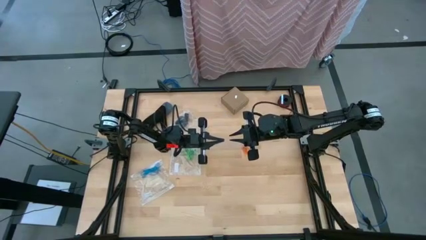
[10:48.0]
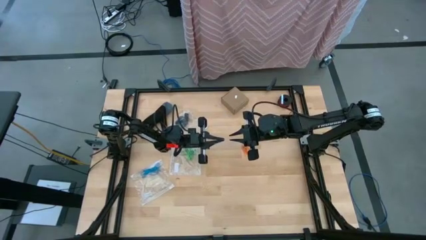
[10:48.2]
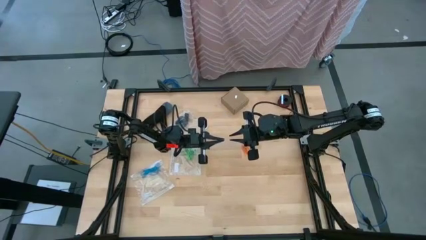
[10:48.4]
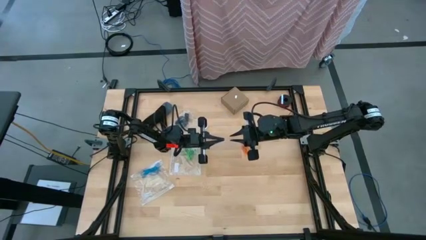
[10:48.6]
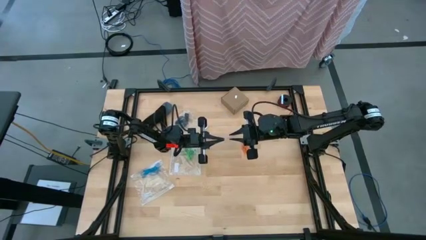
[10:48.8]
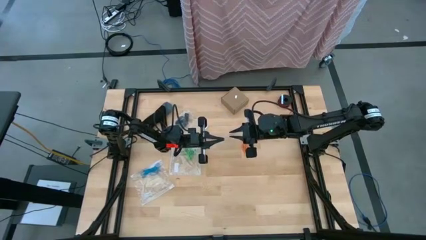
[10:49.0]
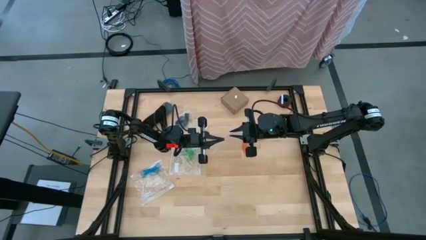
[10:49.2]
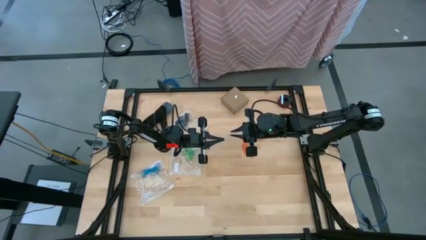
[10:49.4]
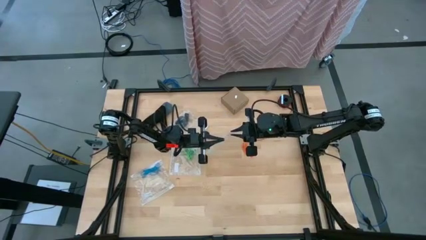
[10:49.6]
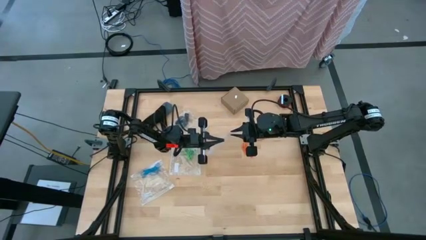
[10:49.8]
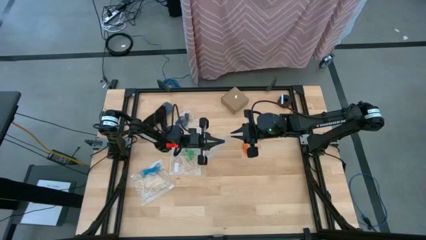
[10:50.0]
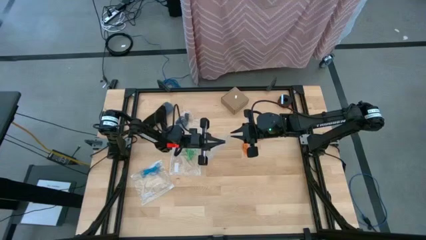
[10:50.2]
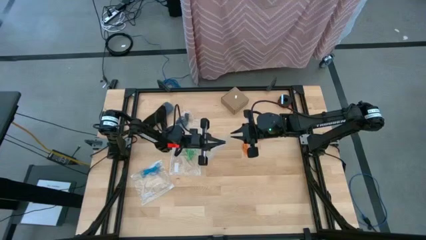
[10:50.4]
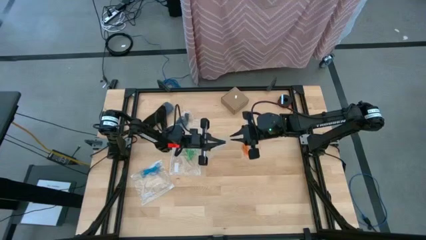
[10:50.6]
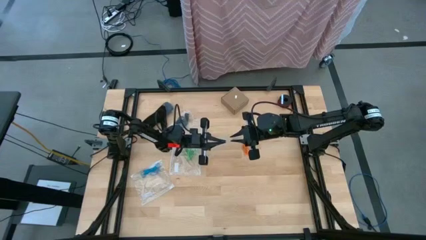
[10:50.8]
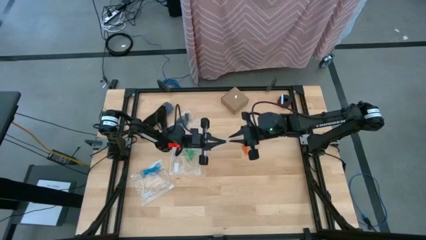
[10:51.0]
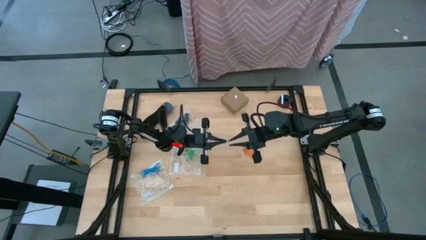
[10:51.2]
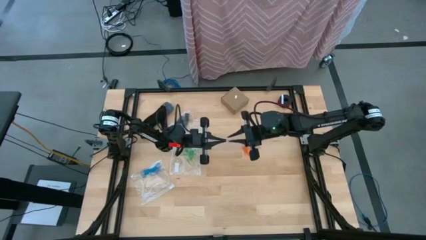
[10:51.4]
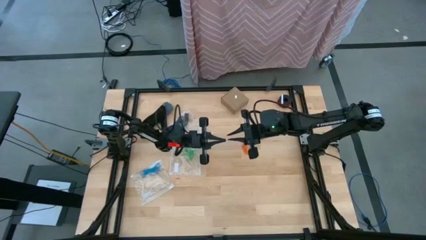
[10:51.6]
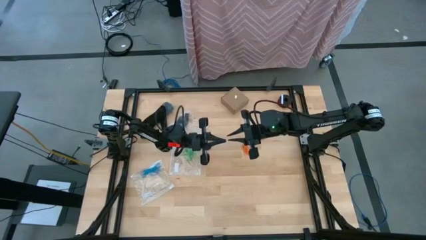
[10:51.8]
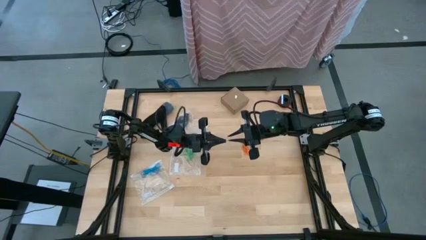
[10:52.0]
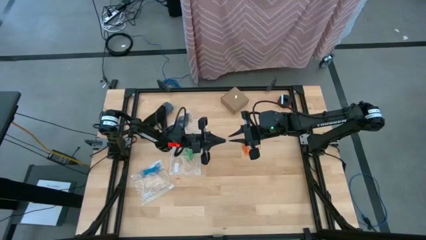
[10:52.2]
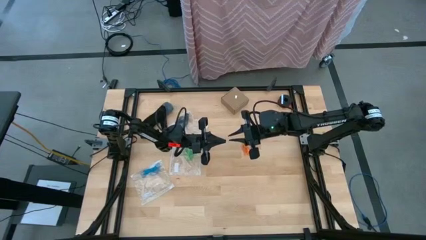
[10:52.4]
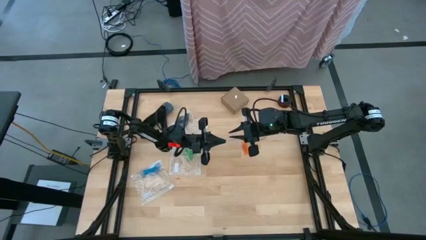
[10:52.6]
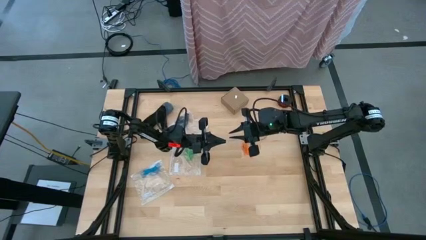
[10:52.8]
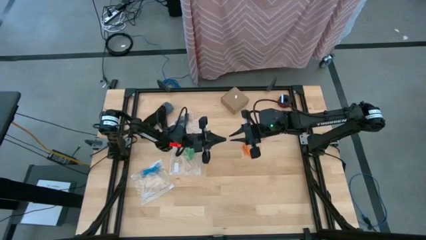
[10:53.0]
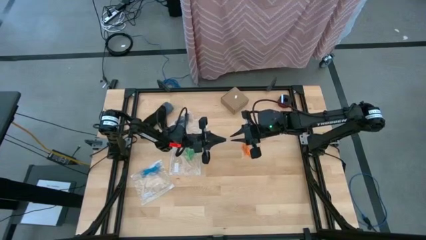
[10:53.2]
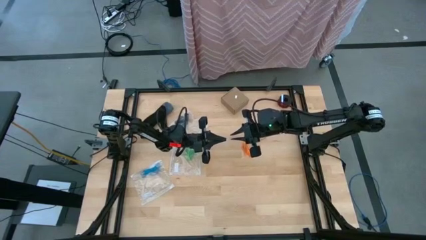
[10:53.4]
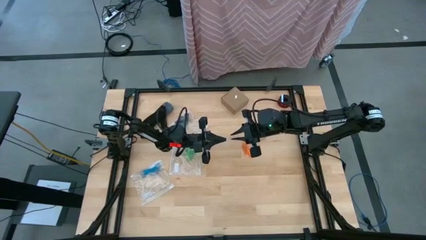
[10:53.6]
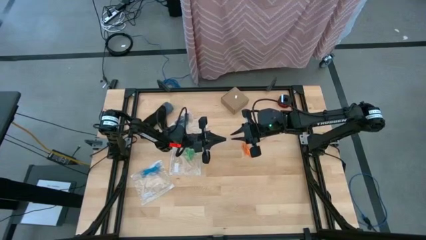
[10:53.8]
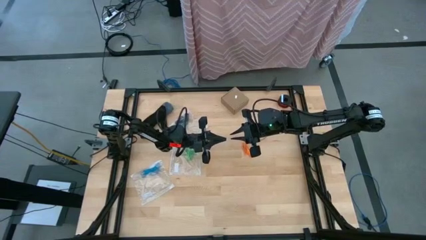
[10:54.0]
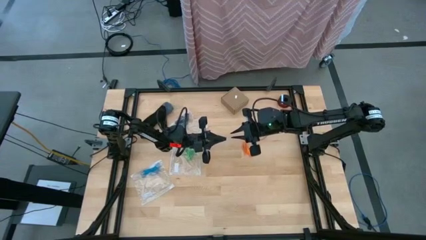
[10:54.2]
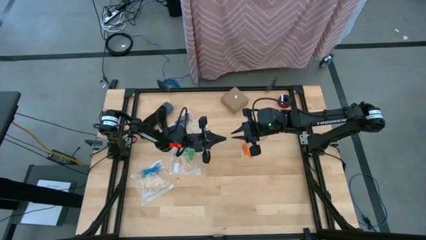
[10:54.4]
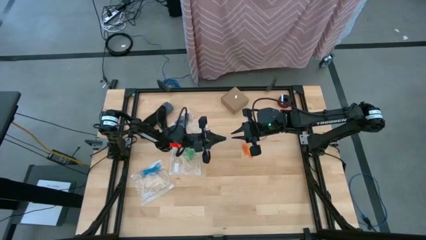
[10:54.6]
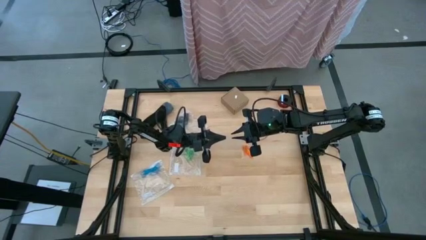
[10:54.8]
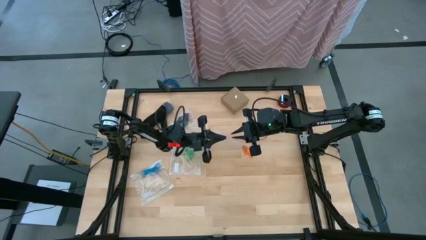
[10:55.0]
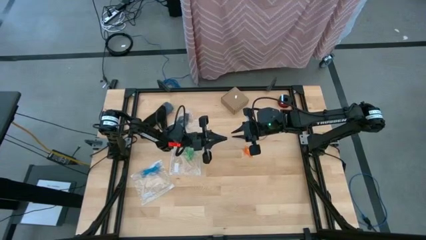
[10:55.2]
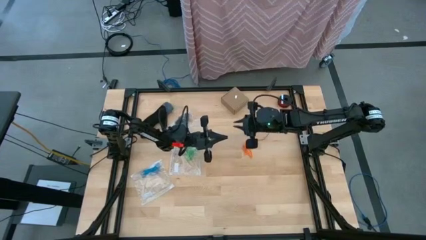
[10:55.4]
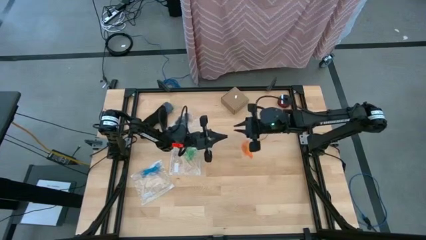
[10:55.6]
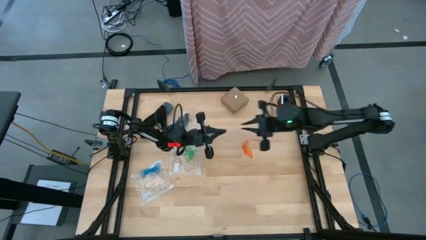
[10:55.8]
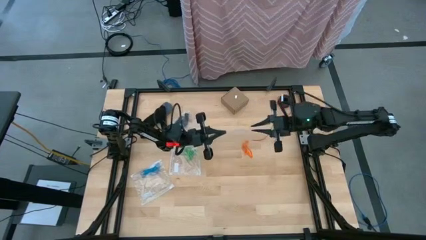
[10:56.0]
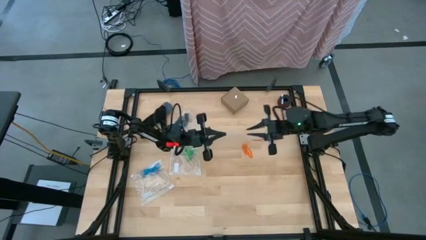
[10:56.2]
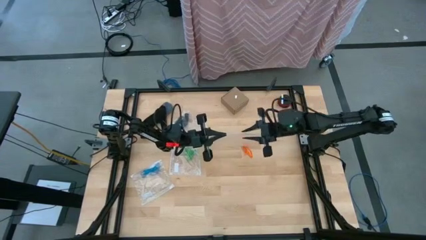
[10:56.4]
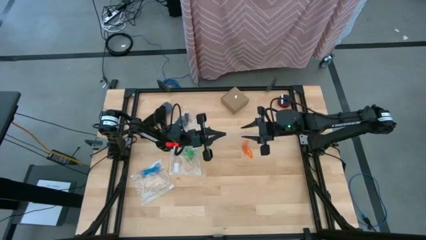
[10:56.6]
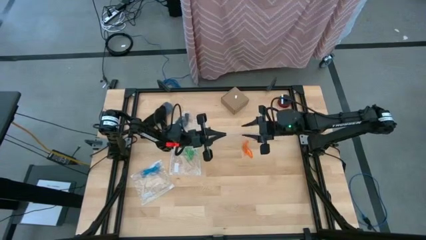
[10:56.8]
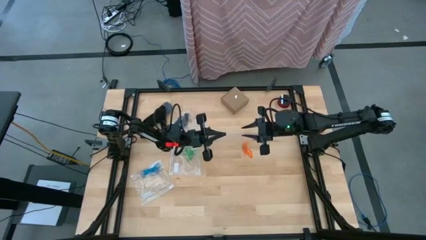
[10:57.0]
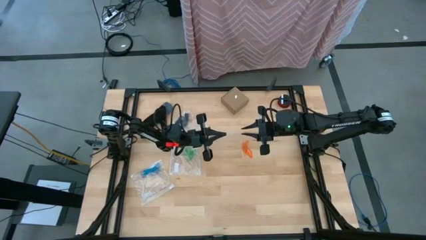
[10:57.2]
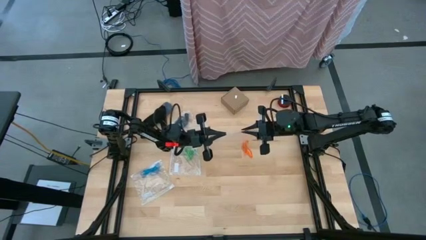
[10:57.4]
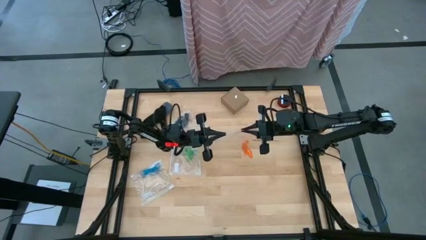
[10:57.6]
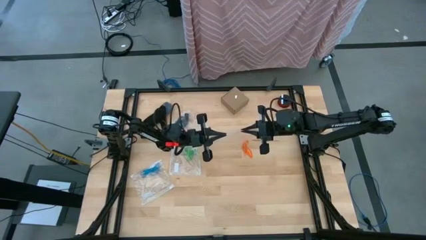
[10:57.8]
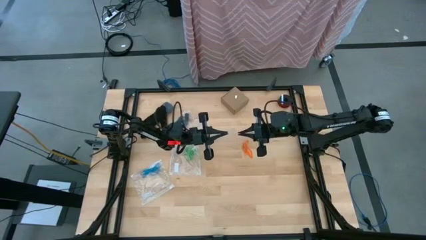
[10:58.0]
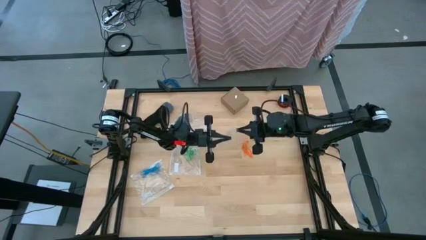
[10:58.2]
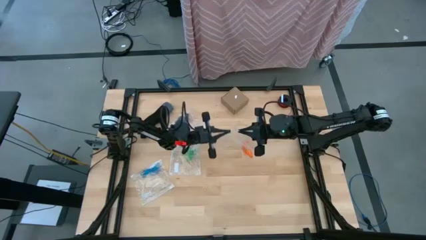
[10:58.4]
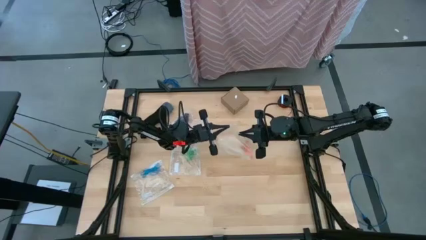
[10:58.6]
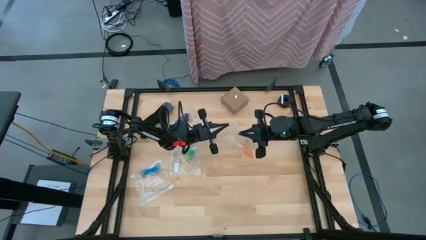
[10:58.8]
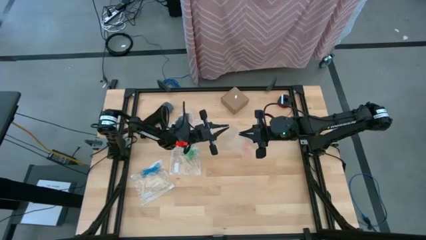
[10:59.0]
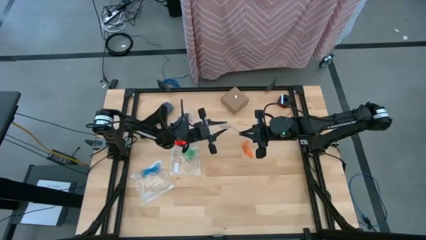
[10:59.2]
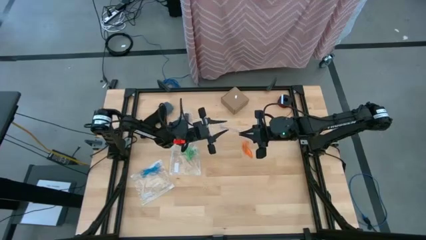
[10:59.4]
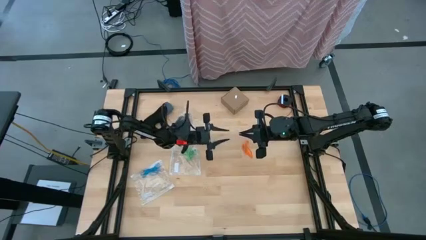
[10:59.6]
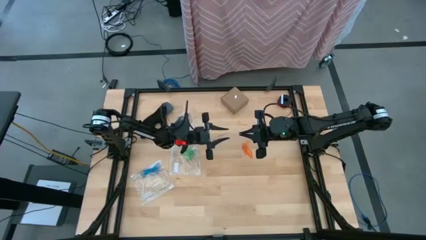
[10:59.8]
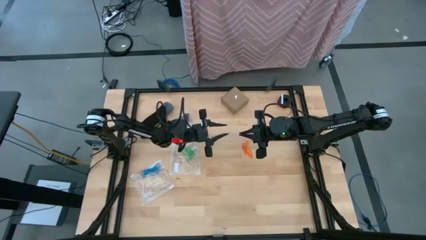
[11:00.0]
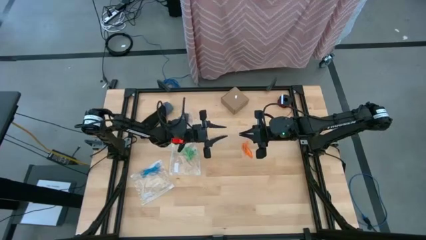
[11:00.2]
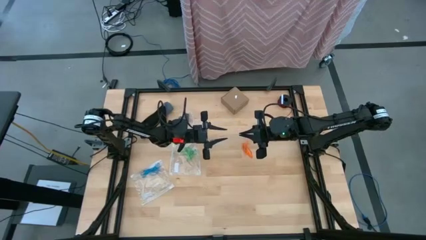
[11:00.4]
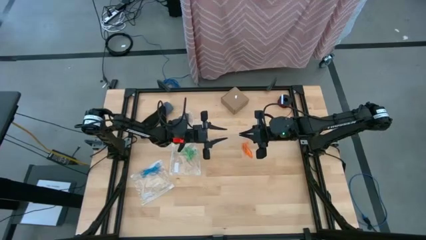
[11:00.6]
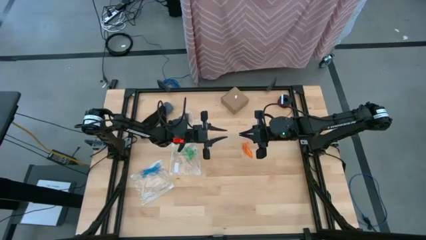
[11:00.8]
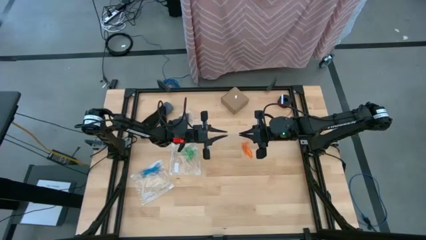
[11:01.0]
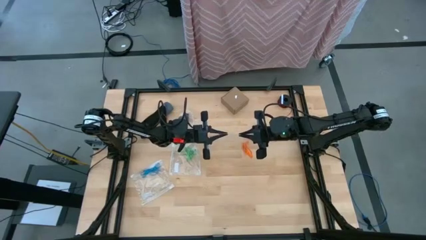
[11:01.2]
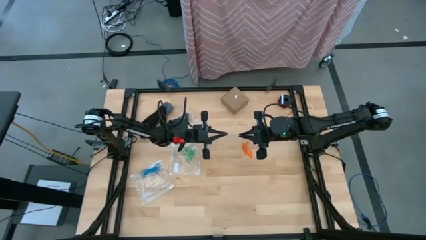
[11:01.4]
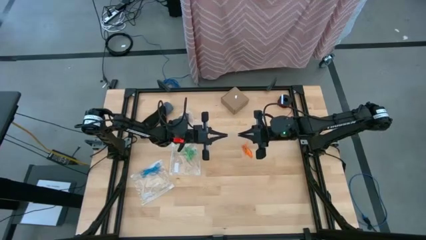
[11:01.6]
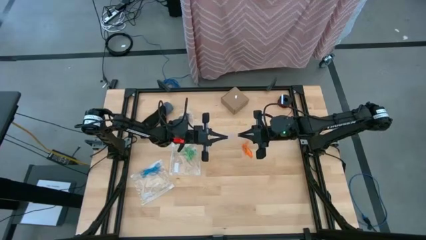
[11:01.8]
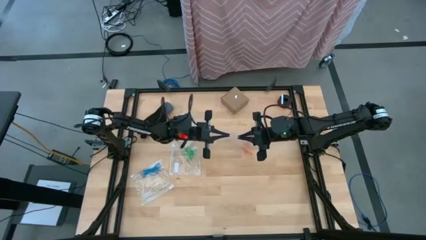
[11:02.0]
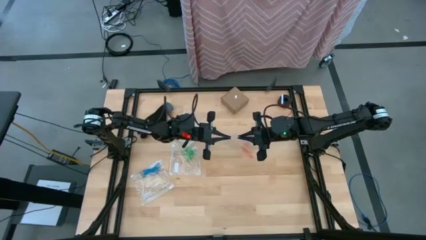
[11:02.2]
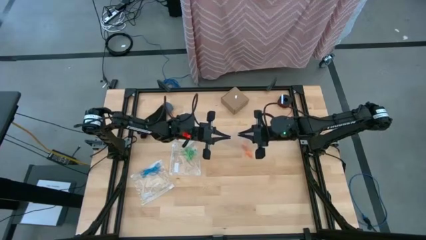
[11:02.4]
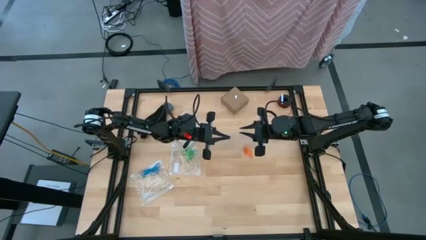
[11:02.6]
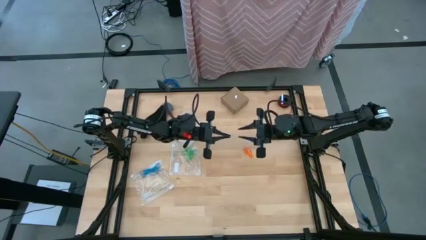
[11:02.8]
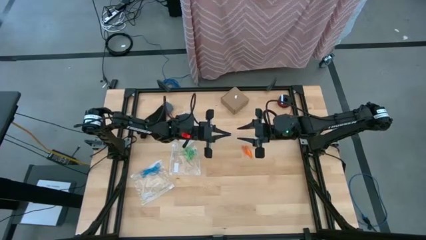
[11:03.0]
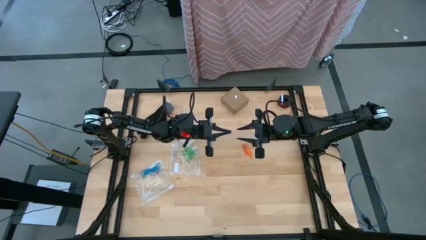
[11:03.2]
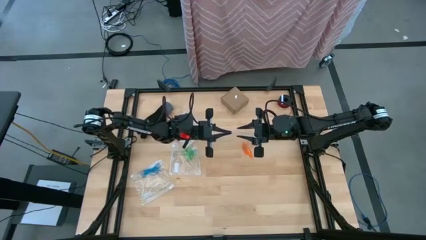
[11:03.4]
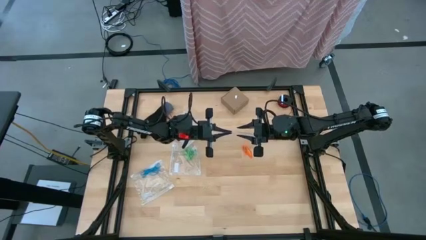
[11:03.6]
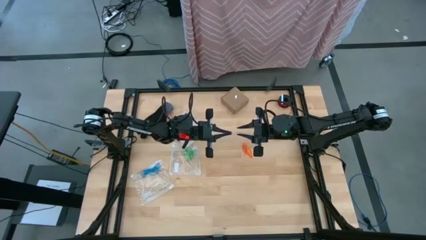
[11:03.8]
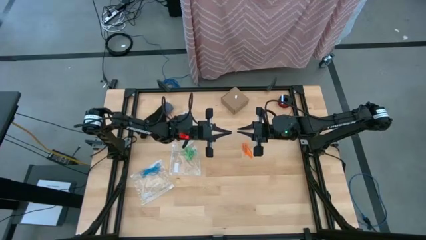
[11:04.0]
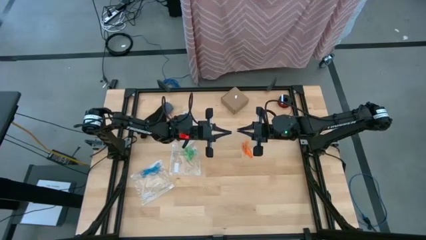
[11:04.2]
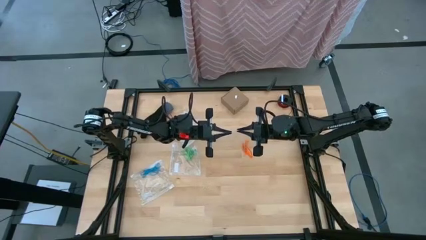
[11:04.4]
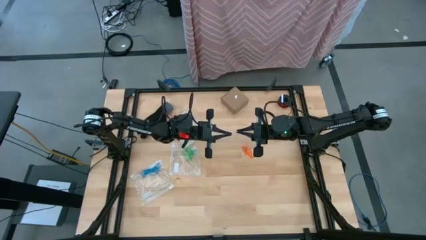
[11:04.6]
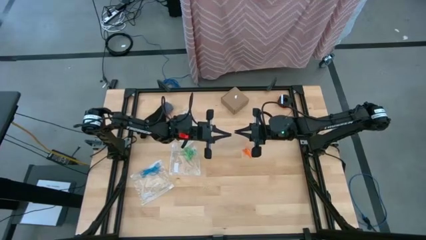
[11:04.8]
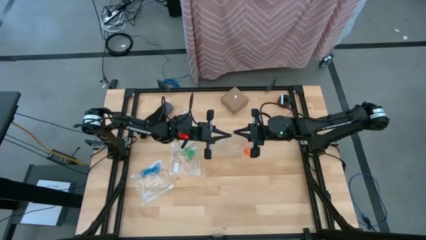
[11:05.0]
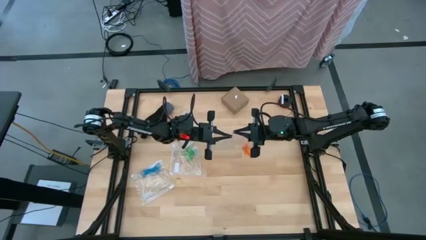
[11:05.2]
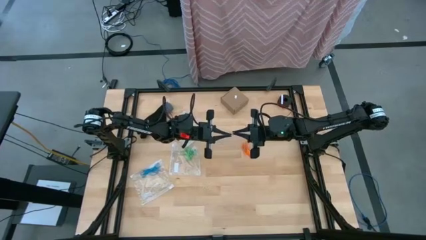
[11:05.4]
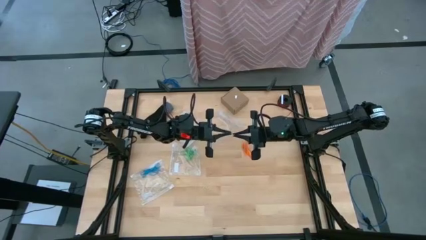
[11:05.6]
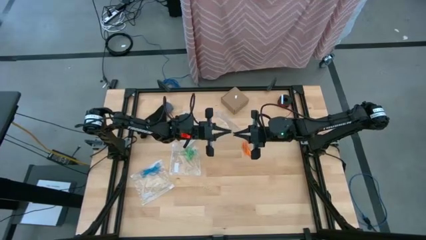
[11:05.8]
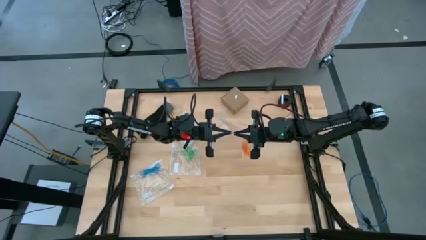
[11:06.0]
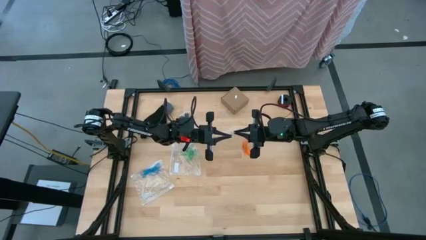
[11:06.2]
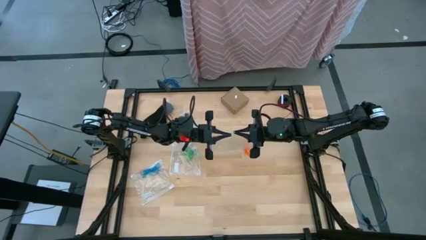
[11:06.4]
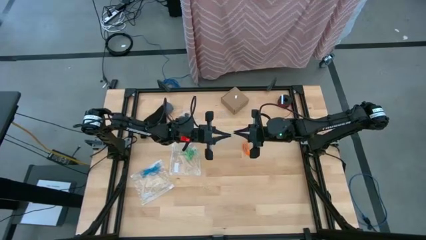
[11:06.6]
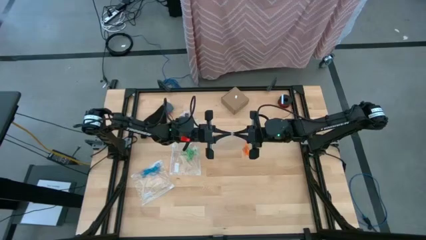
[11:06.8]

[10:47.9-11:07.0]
Task: Sort rubber bands
Open the transparent zip bag
